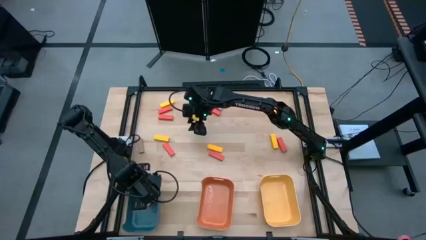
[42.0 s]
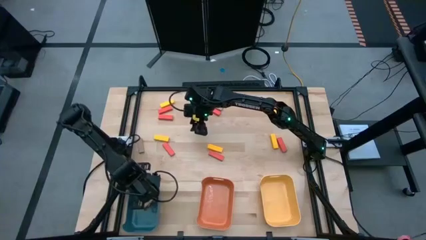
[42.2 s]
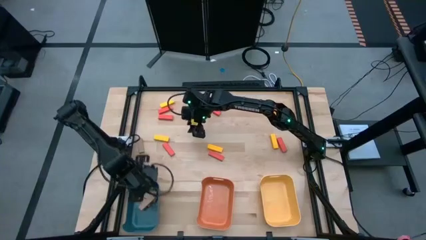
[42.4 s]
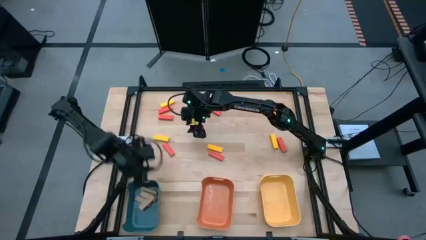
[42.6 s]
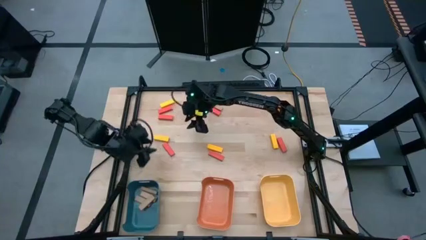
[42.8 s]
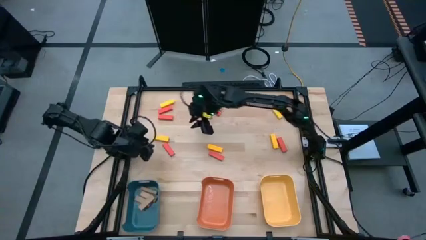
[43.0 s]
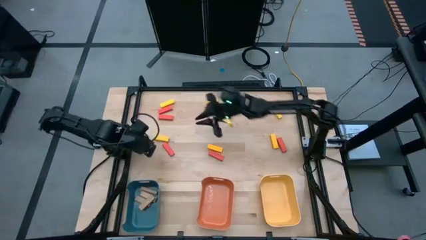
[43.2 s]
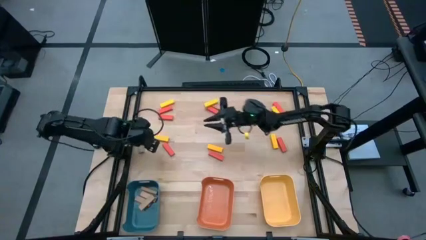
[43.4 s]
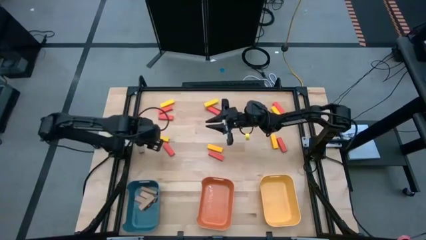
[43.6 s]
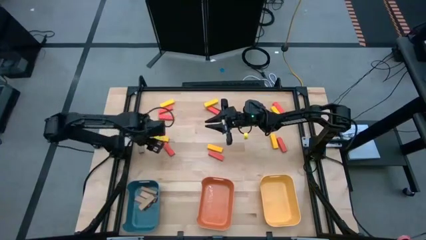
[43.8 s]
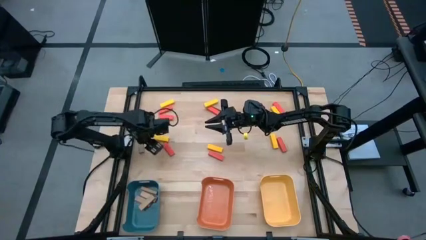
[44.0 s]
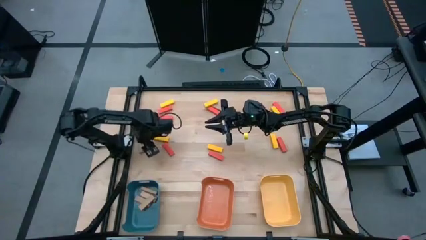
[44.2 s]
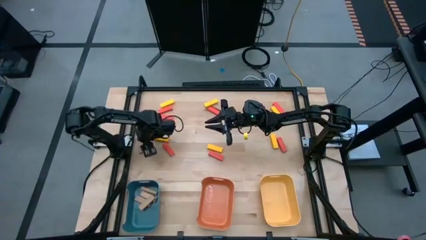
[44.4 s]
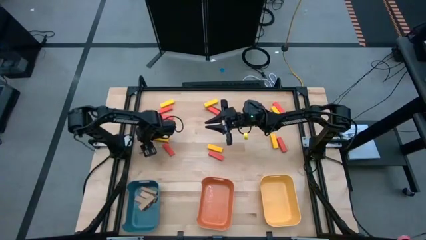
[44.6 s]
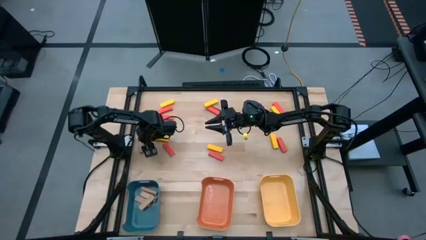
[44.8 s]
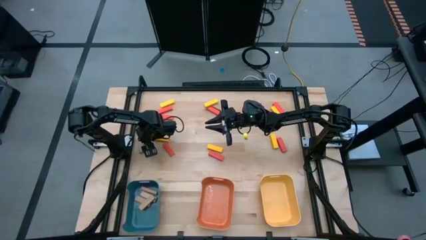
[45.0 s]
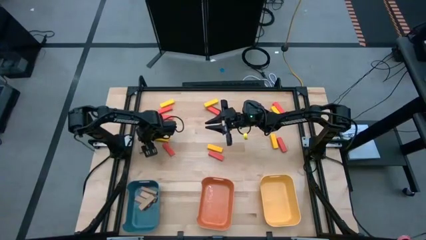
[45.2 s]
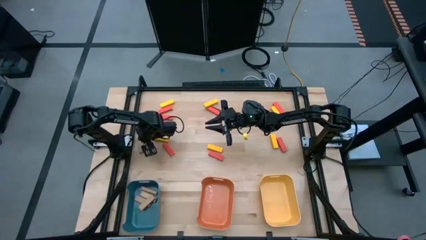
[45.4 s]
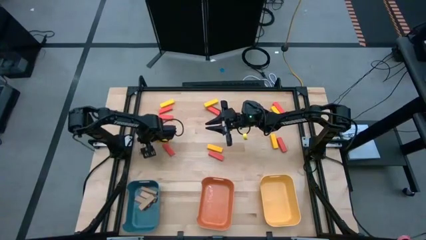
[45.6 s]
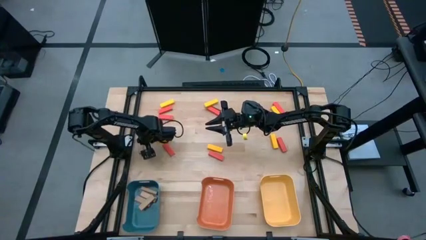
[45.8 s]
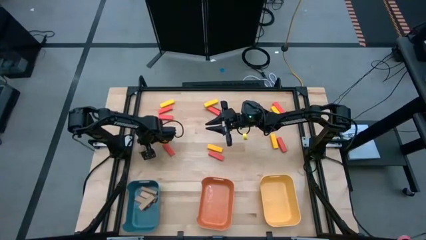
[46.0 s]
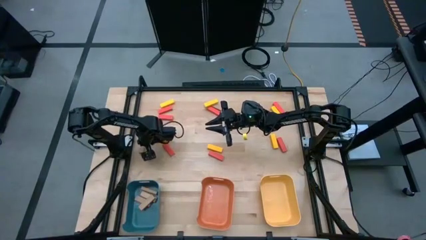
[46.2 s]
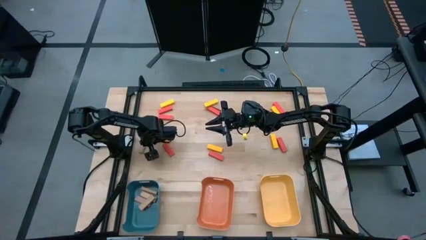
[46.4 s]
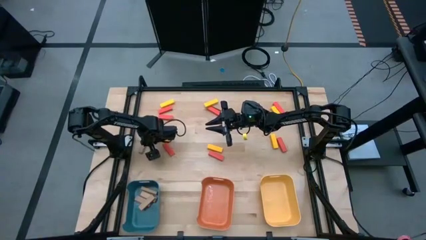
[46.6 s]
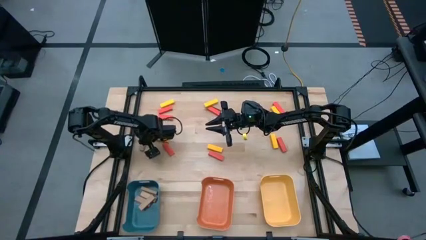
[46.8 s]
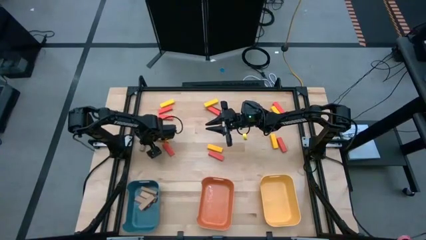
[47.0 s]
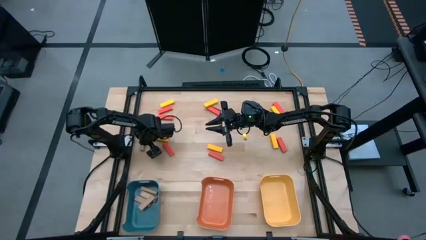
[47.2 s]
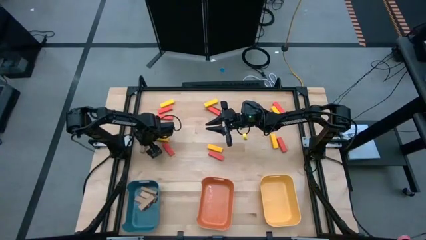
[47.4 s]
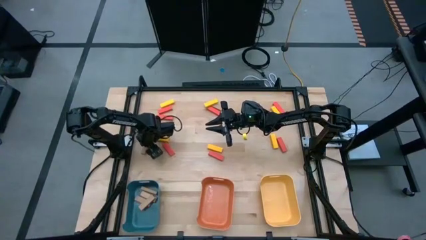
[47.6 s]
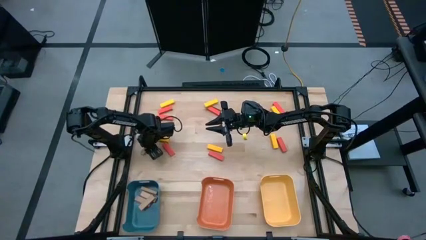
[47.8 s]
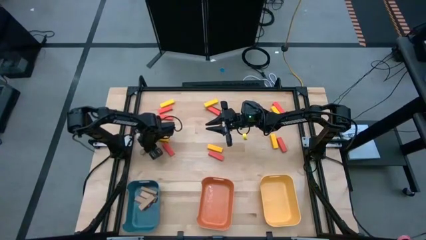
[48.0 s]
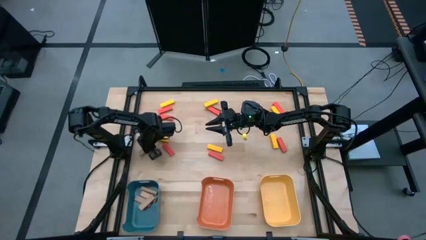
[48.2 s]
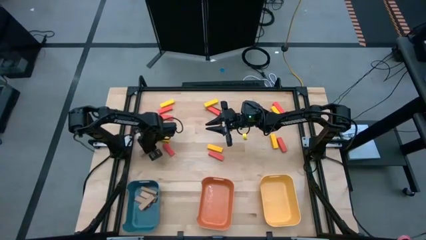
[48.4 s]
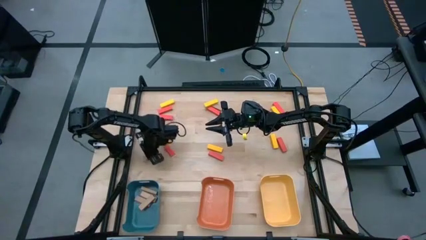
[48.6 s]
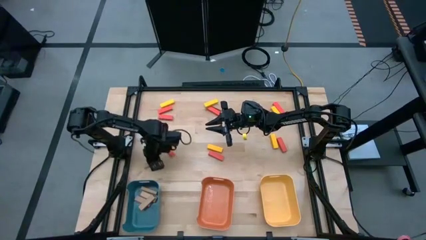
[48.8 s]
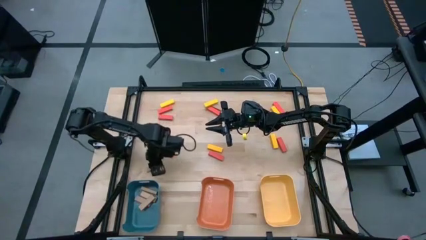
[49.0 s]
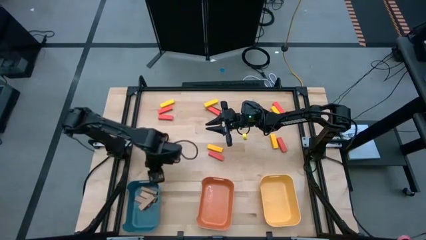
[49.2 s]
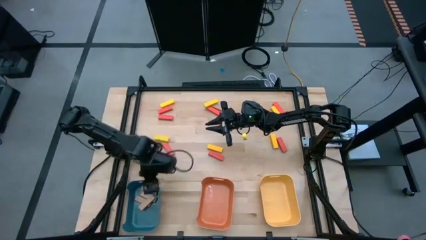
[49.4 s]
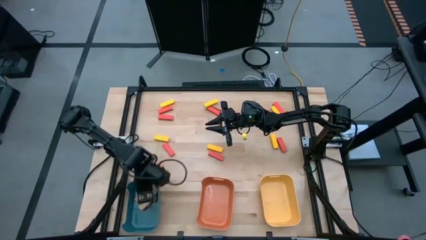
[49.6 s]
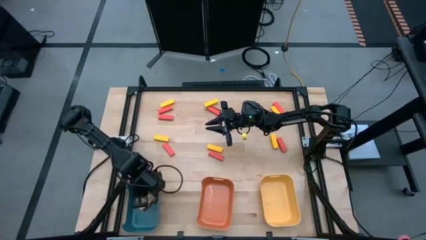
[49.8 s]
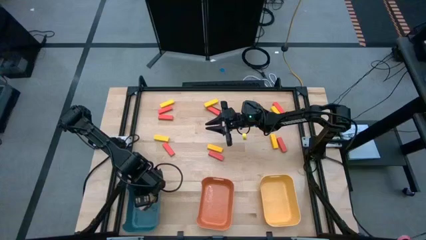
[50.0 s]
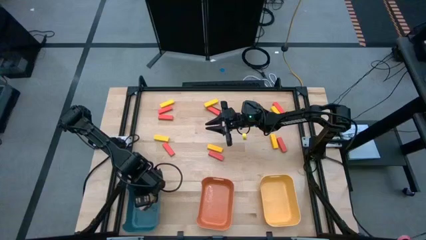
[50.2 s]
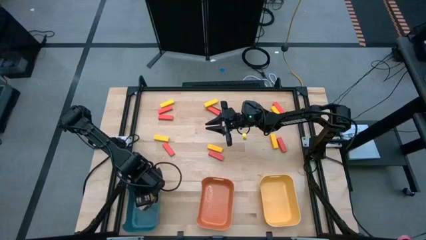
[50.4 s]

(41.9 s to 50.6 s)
Task: Sort blocks
Put the bottom left brown block into the blue bin

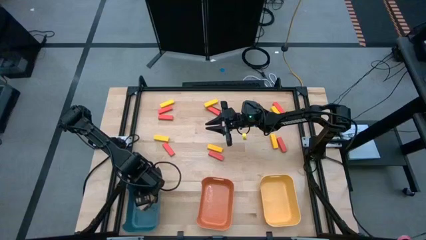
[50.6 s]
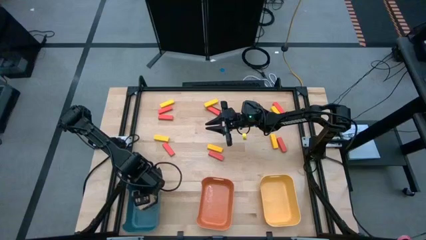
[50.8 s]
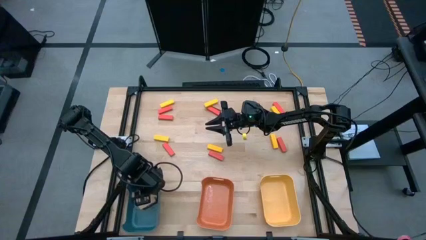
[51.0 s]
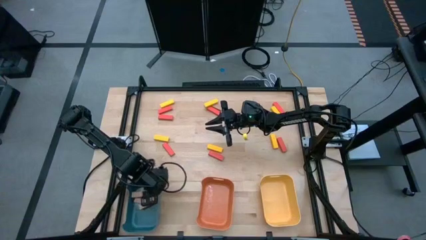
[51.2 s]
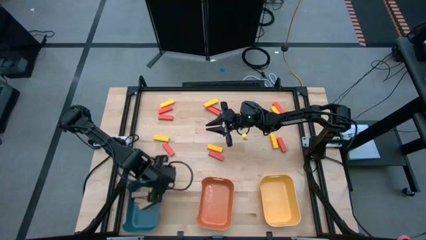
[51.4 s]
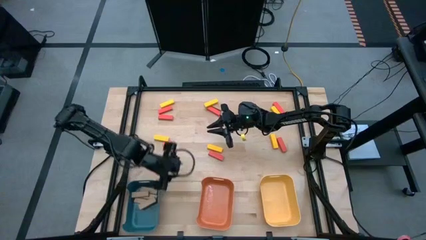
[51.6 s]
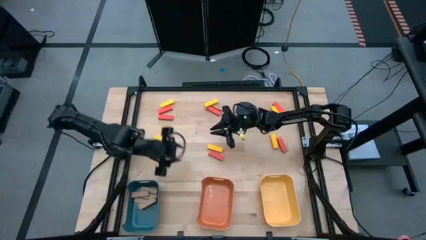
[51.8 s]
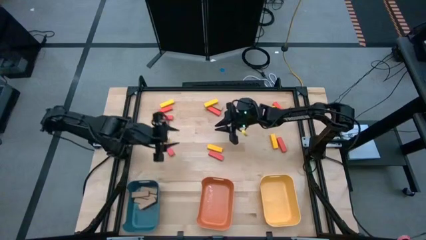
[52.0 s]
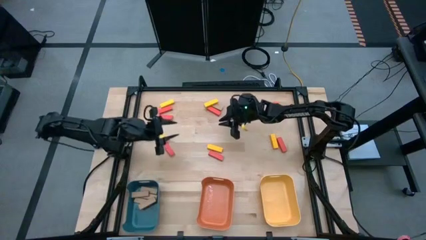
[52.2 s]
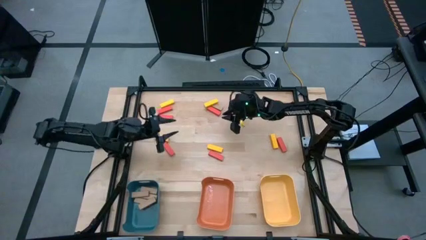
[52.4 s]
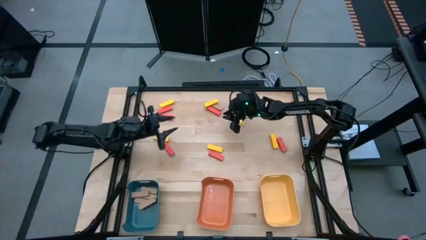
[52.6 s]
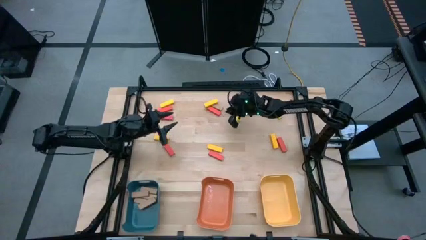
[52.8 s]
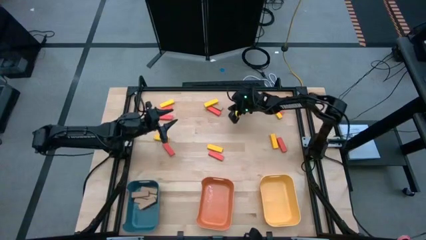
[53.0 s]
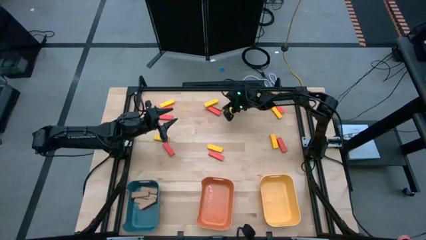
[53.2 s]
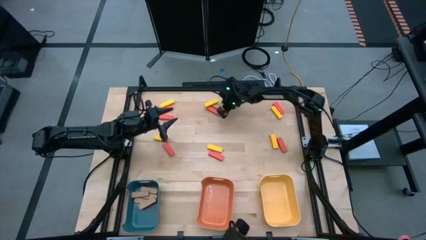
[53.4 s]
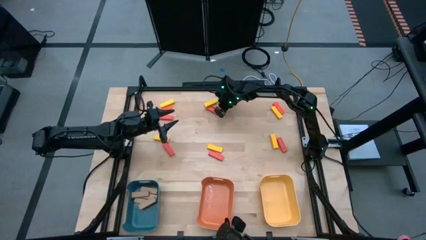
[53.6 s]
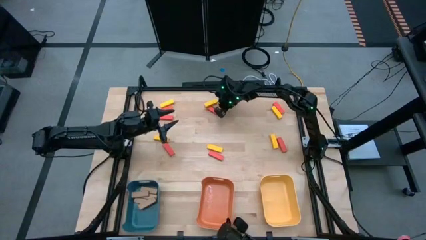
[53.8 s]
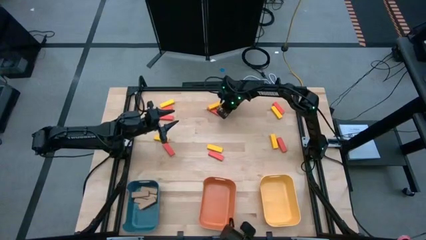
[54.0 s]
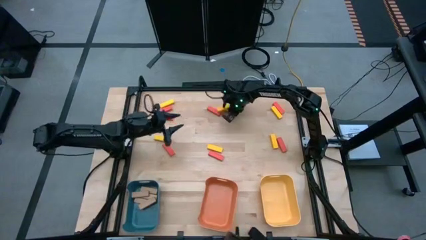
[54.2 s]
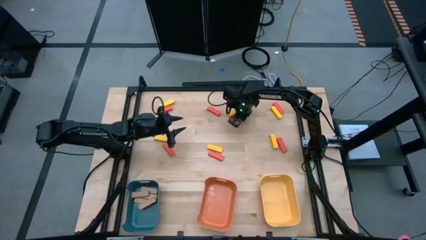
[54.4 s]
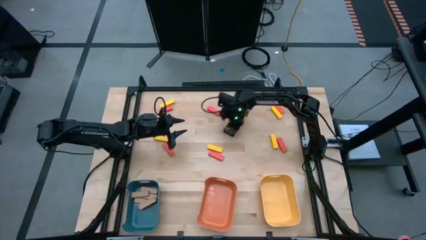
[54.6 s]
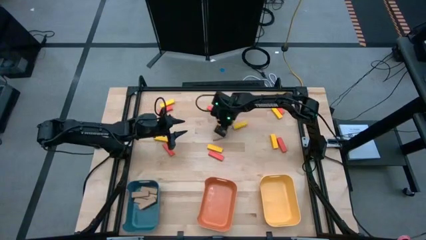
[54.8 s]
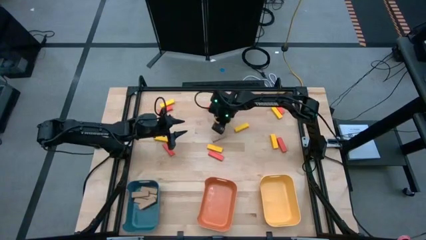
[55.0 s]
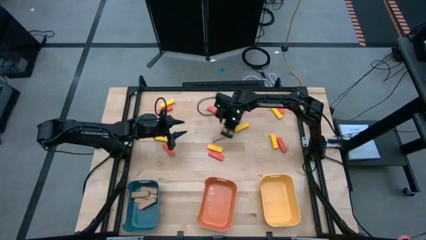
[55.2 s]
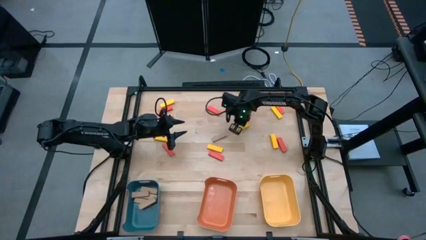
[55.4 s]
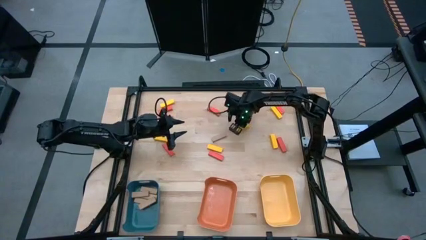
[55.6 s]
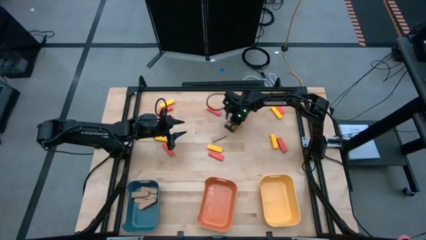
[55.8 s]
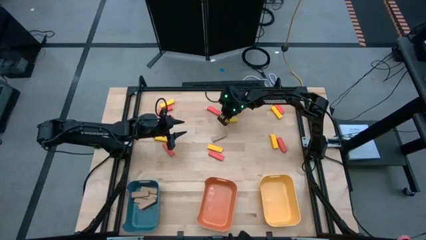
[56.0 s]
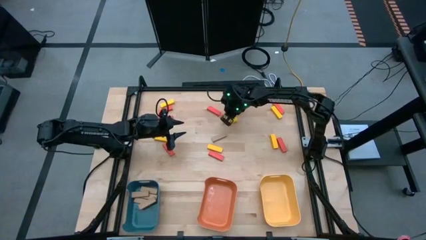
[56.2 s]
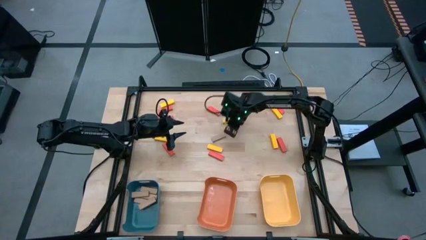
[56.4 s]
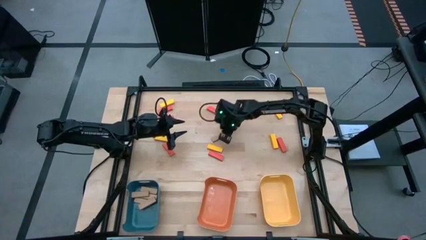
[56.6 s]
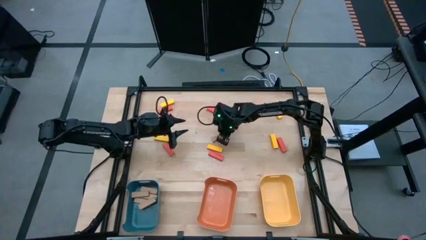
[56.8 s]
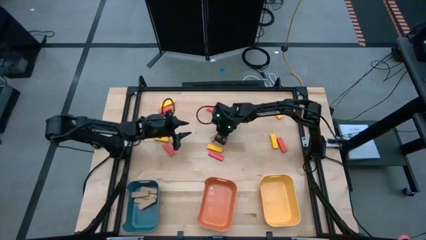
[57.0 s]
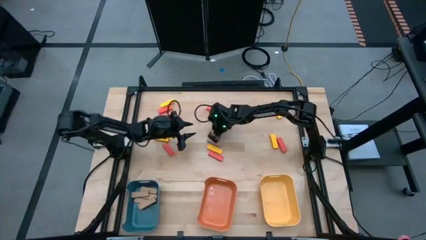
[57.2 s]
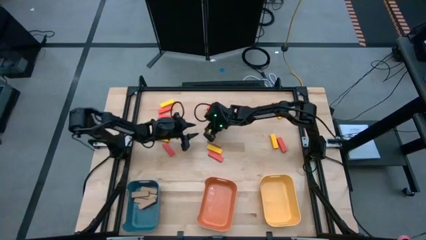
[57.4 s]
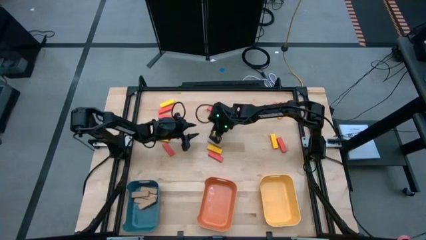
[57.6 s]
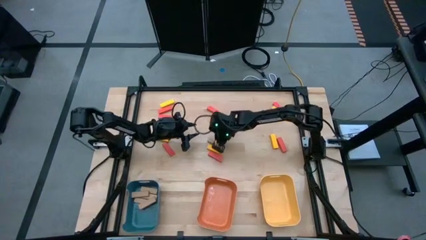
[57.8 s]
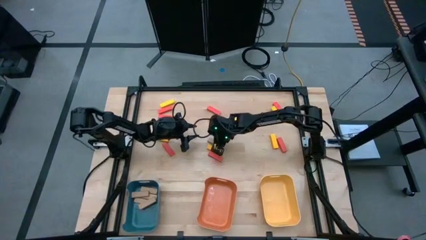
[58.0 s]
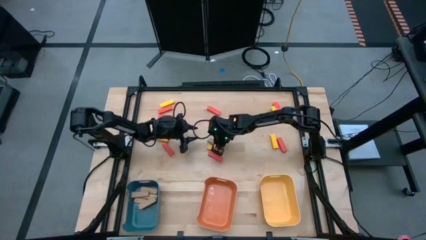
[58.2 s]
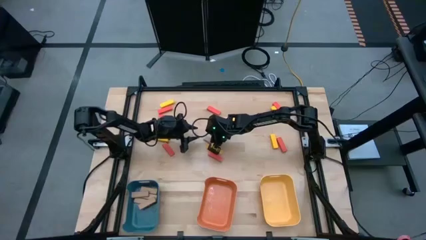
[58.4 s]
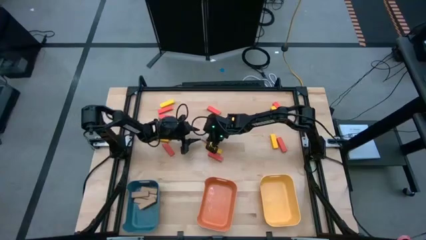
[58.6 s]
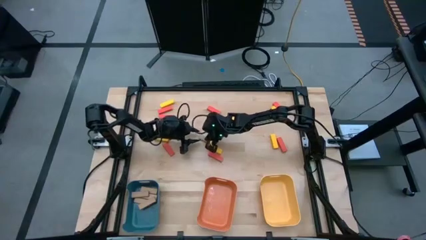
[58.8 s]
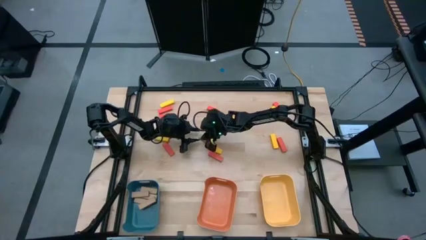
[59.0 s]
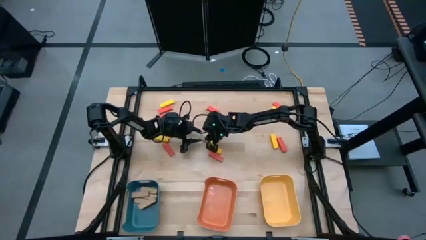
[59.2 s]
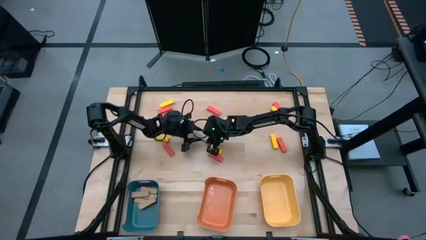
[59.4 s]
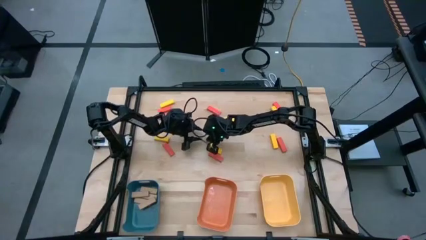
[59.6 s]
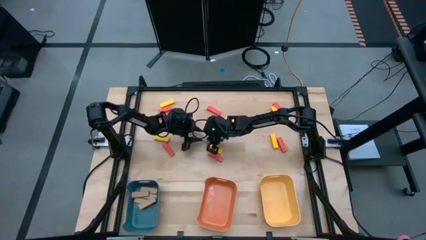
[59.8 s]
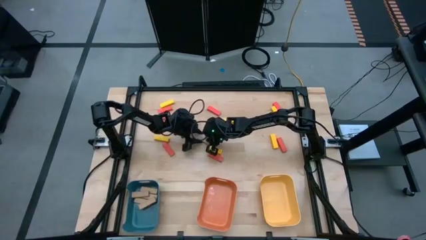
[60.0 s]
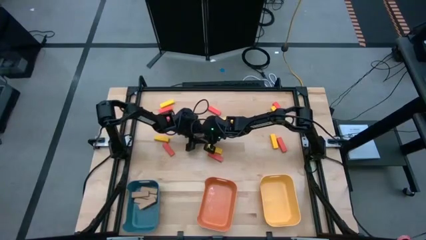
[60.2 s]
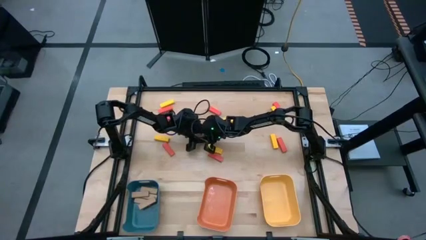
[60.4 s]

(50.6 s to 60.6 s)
Adjust the top middle brown block
